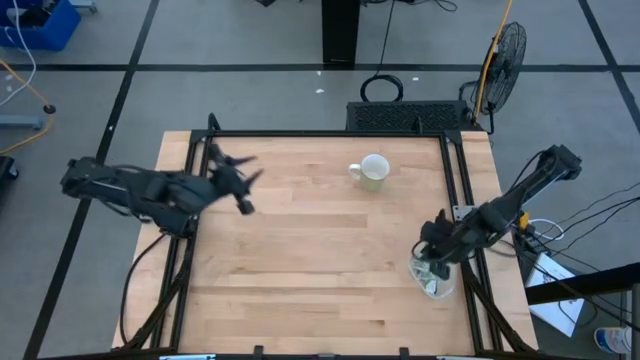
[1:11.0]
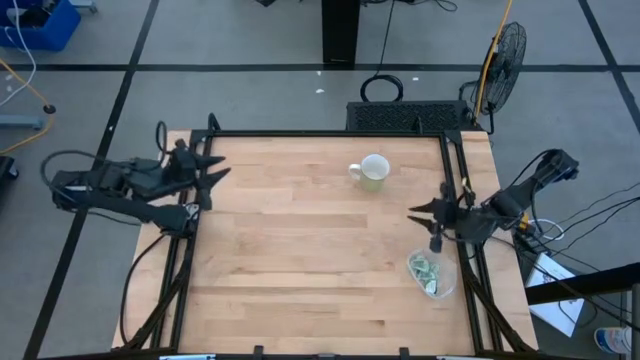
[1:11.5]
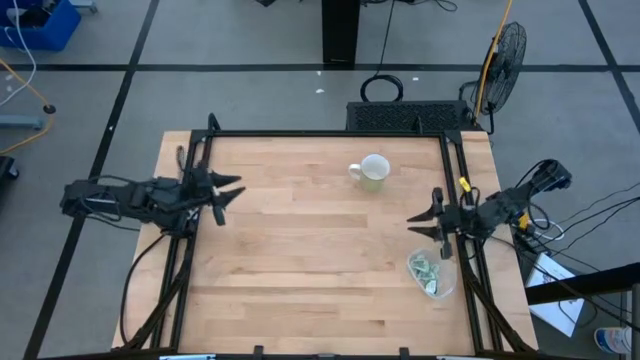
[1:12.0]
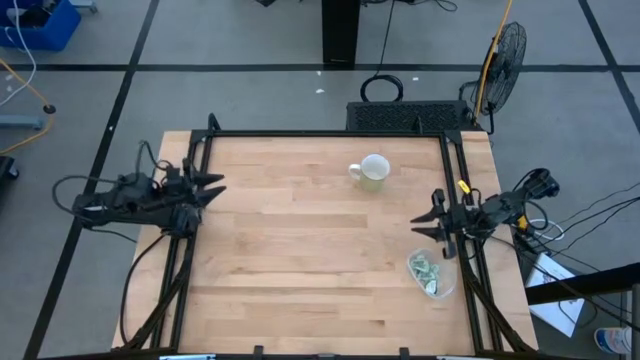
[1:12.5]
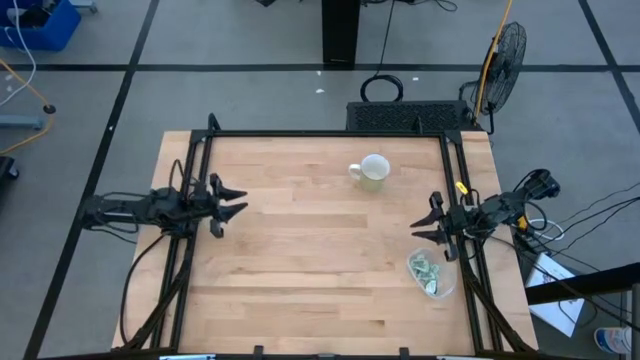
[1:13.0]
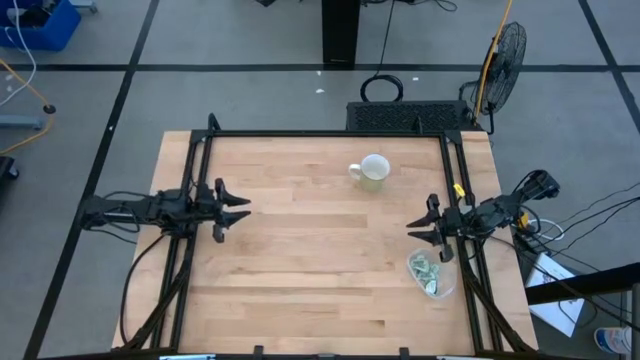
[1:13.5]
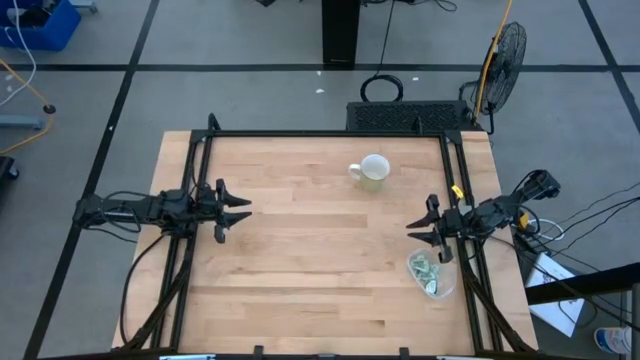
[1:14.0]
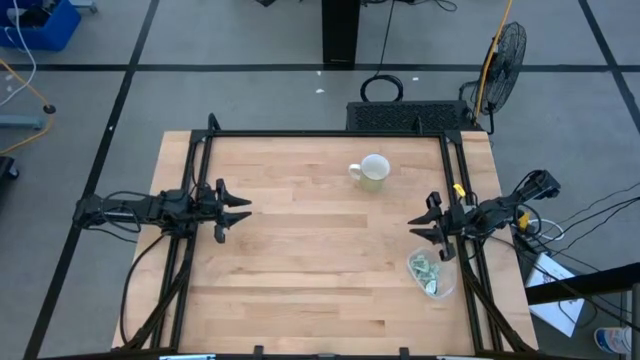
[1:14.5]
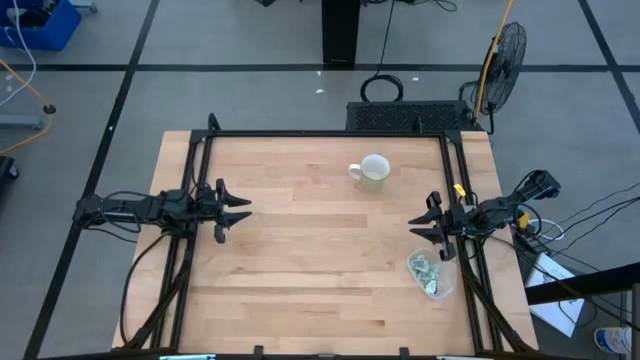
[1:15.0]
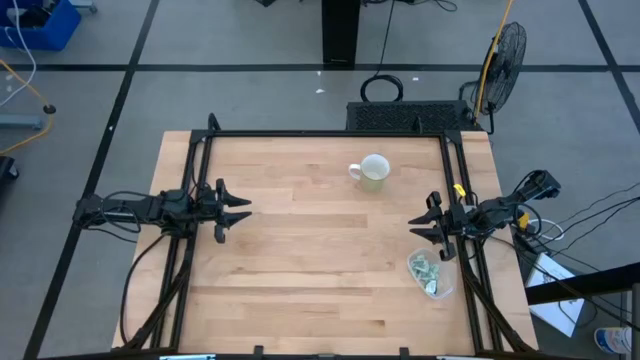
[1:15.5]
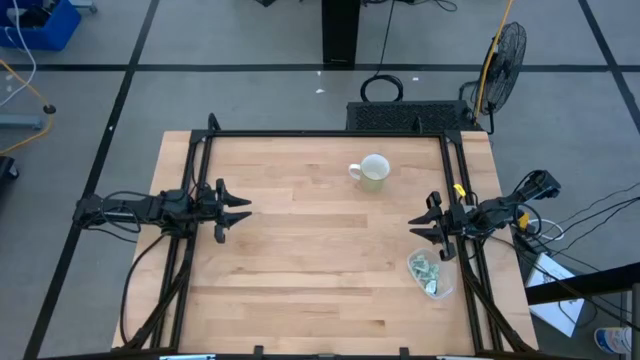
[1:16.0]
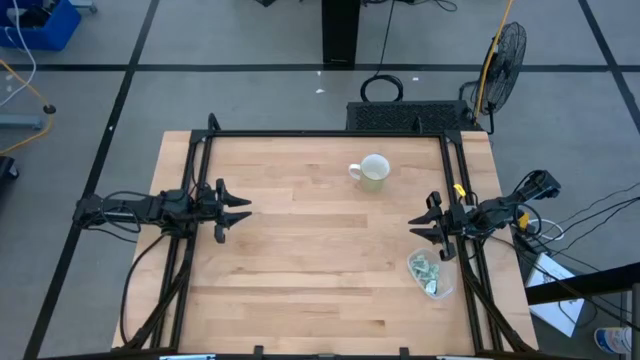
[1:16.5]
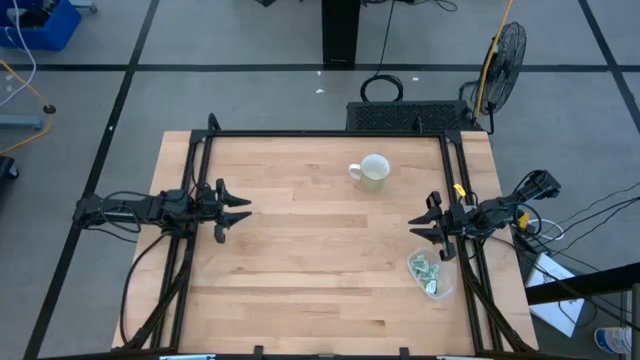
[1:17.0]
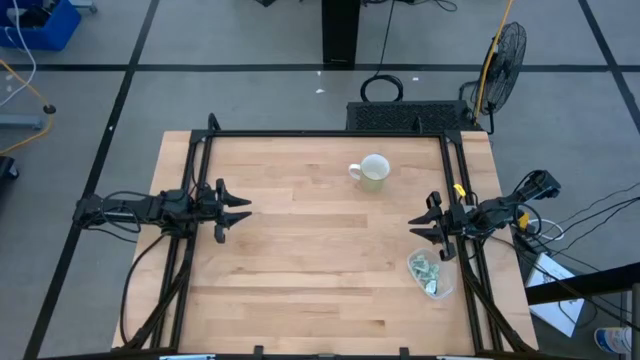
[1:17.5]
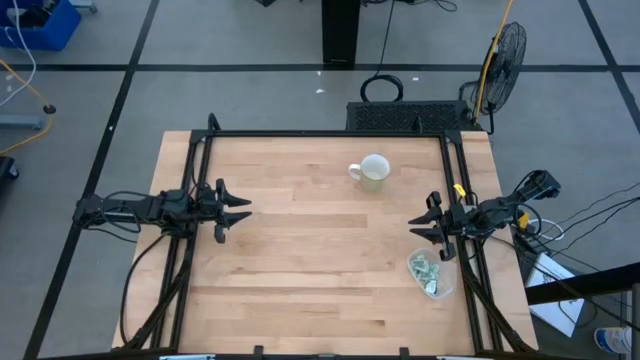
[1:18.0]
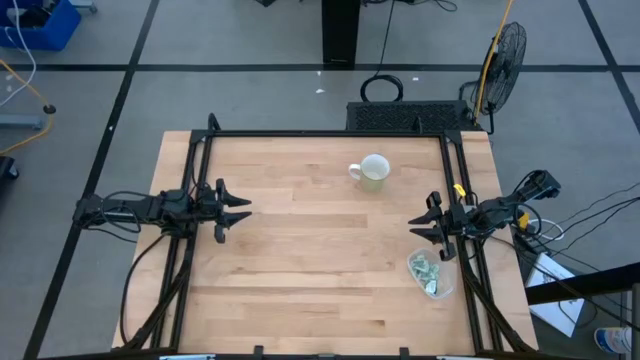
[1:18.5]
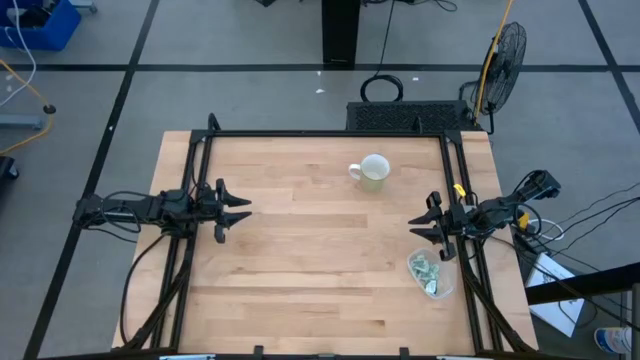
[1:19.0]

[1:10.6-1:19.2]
Task: Pick and place Stevia / Truvia into bins
Return to Home Position

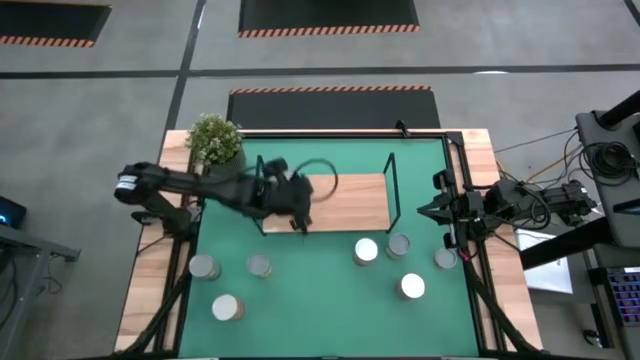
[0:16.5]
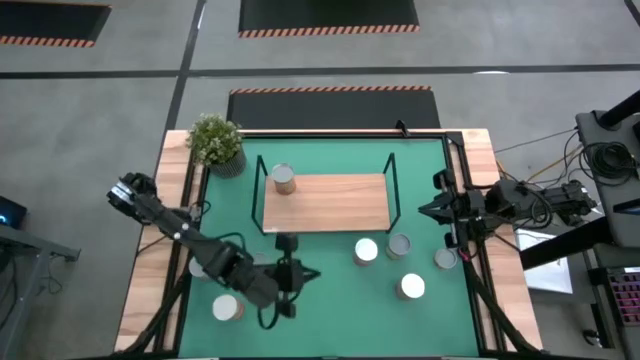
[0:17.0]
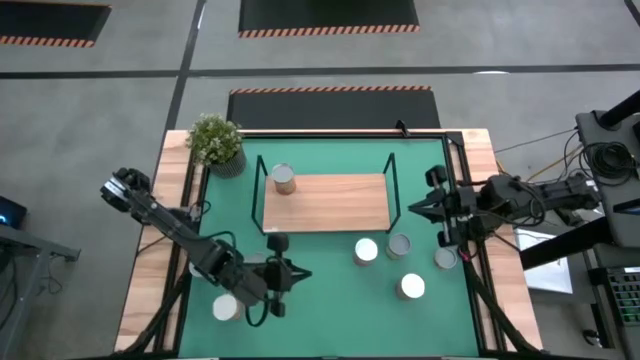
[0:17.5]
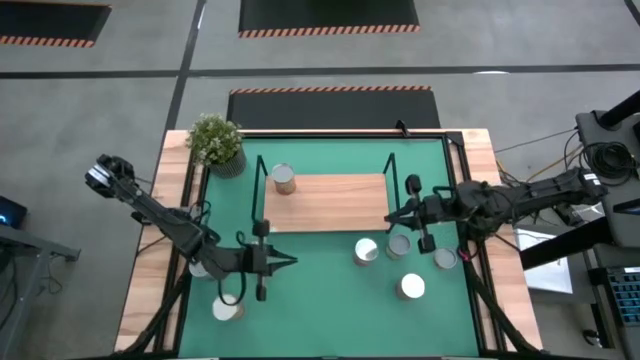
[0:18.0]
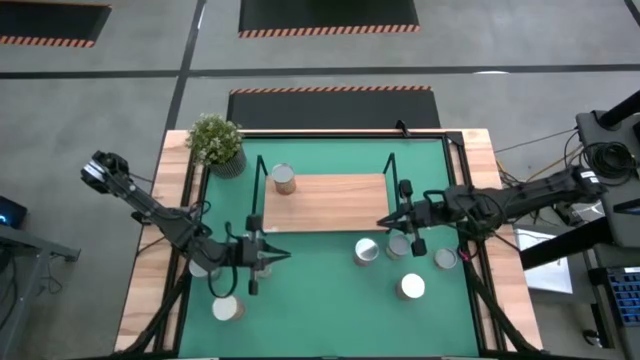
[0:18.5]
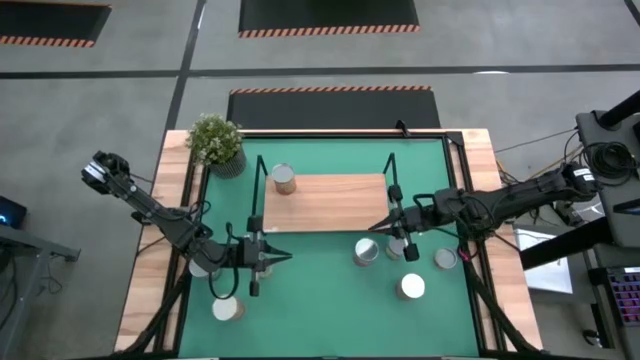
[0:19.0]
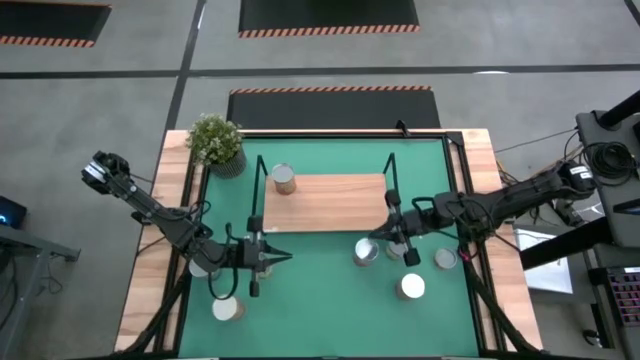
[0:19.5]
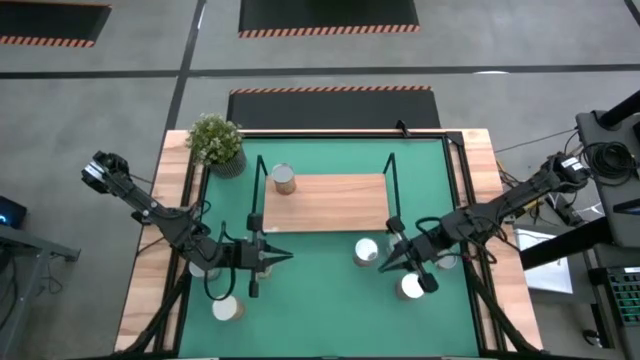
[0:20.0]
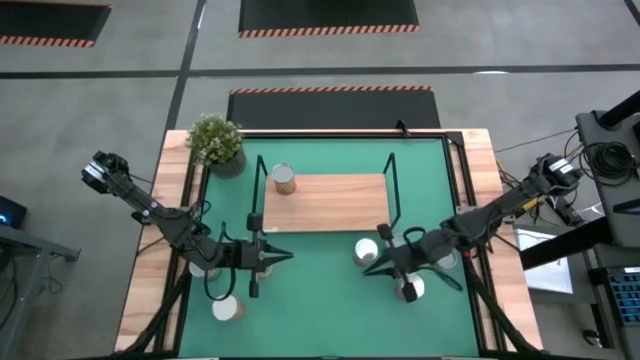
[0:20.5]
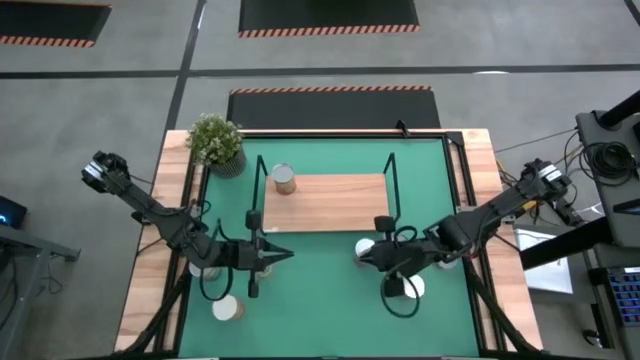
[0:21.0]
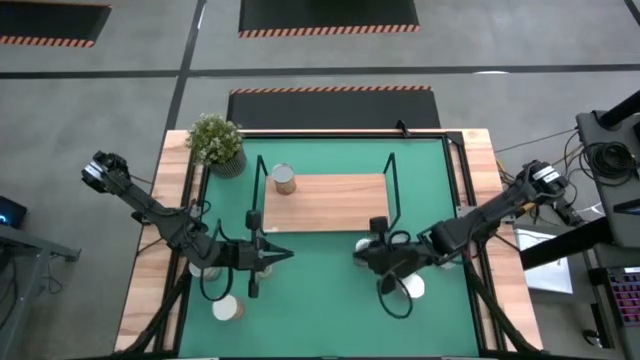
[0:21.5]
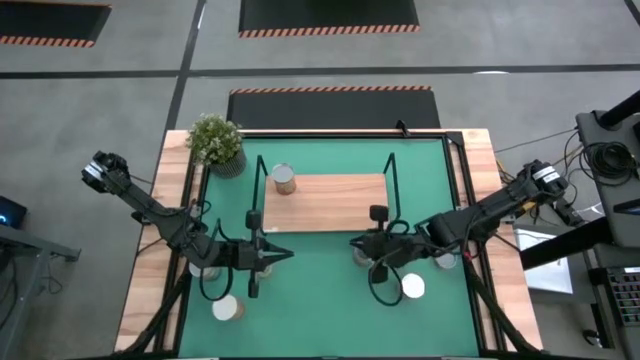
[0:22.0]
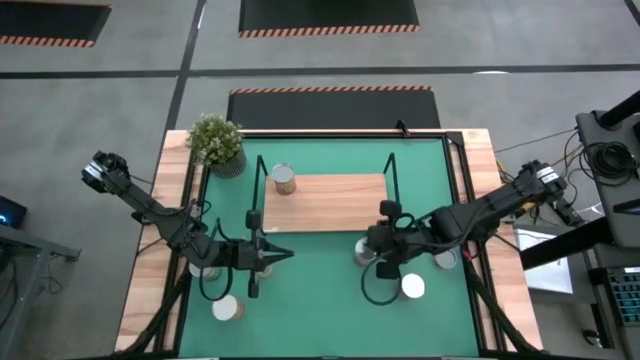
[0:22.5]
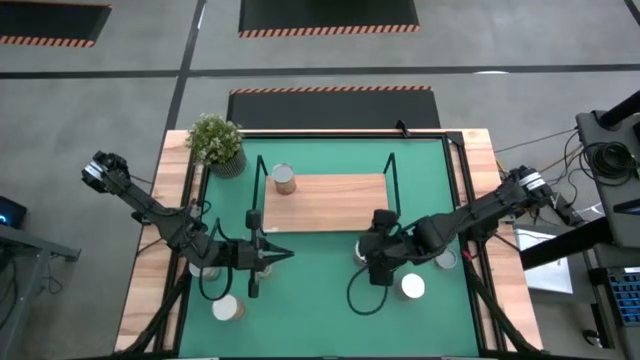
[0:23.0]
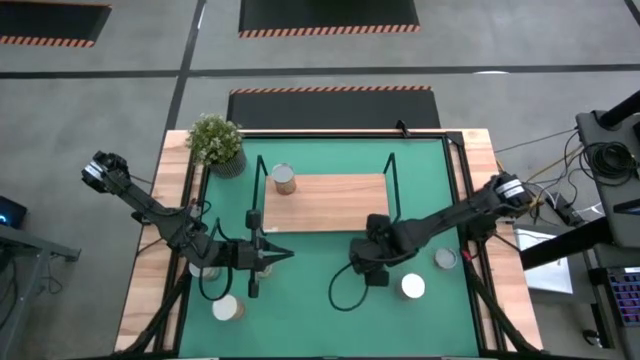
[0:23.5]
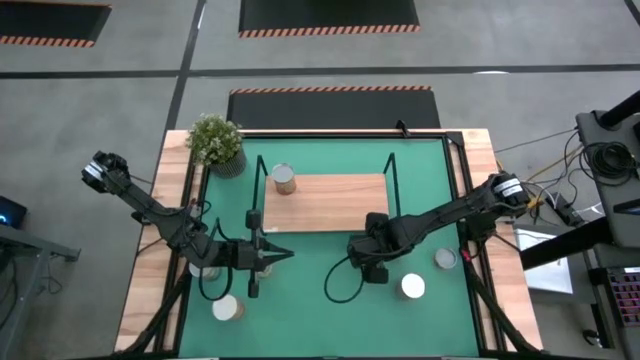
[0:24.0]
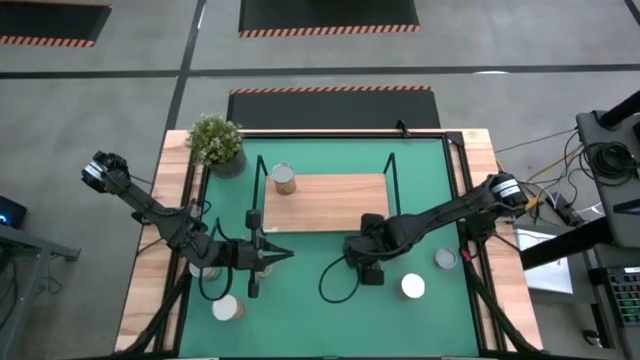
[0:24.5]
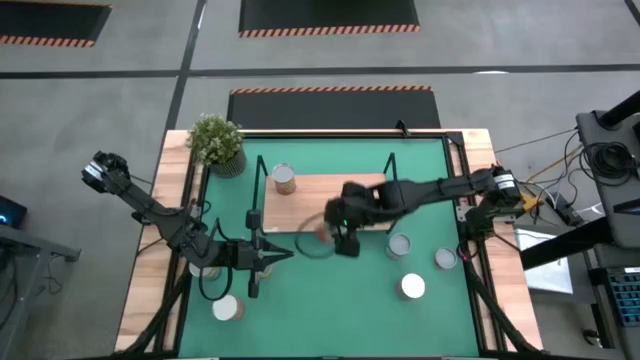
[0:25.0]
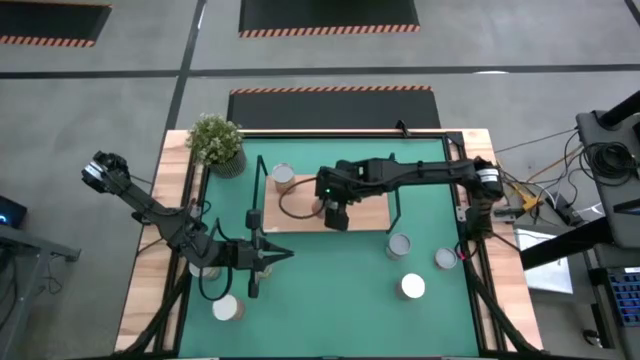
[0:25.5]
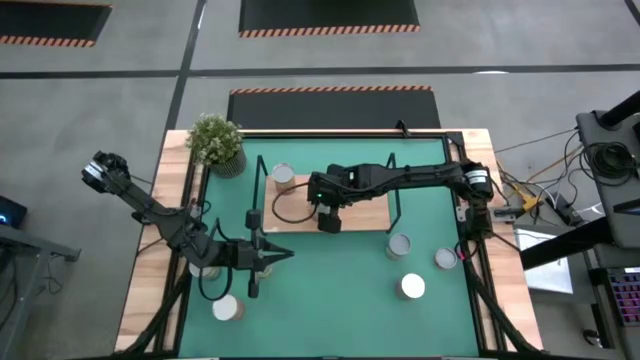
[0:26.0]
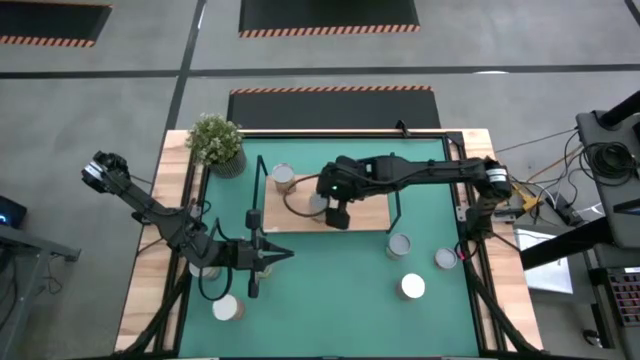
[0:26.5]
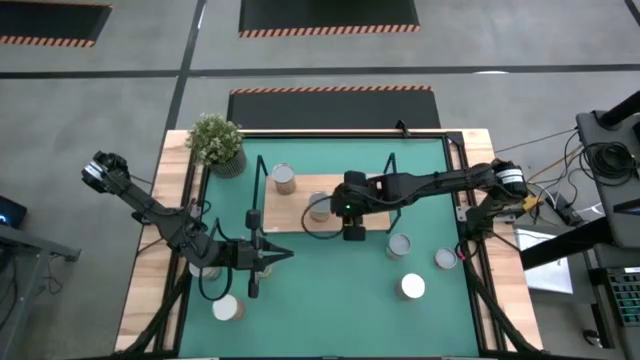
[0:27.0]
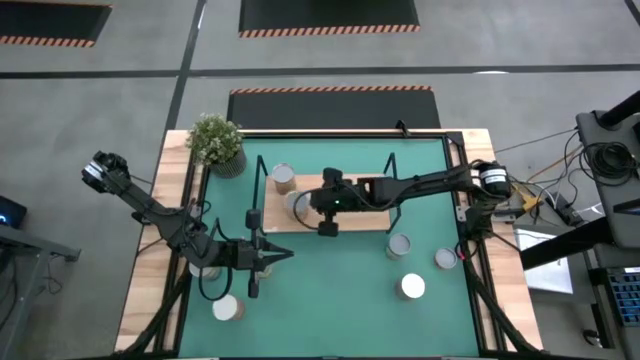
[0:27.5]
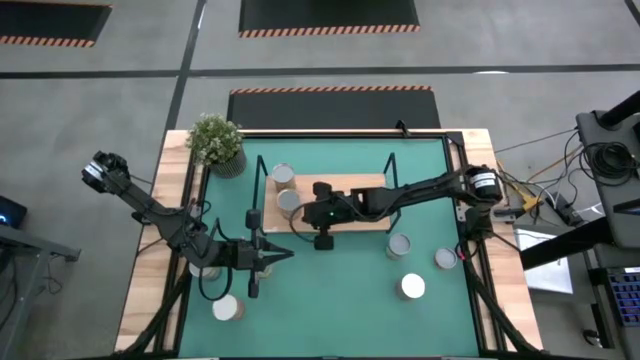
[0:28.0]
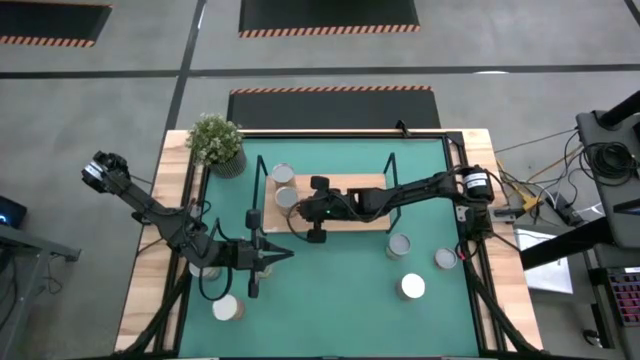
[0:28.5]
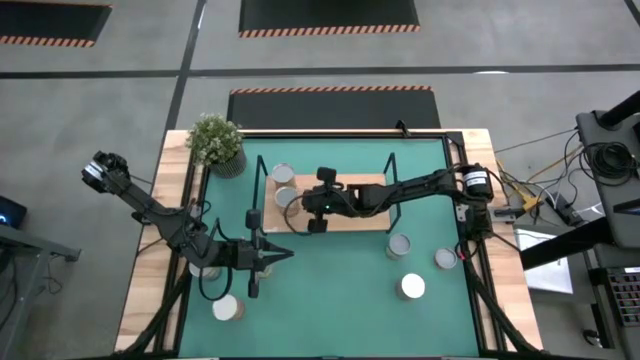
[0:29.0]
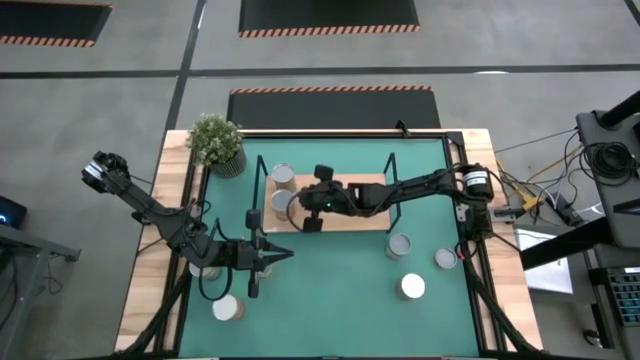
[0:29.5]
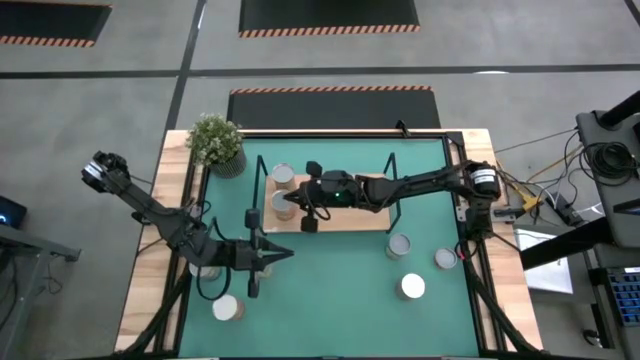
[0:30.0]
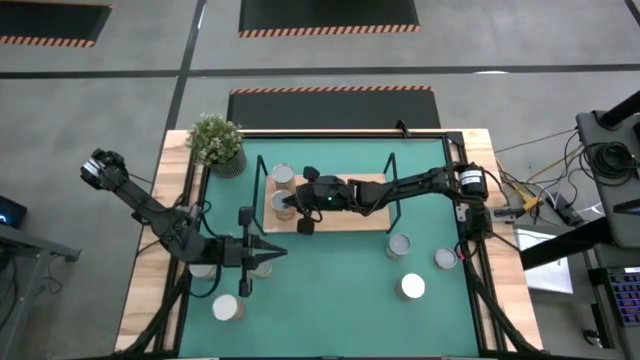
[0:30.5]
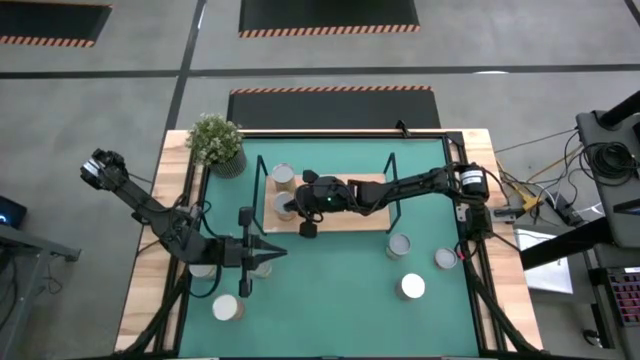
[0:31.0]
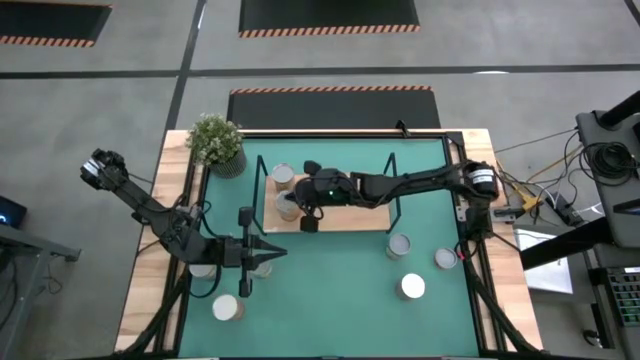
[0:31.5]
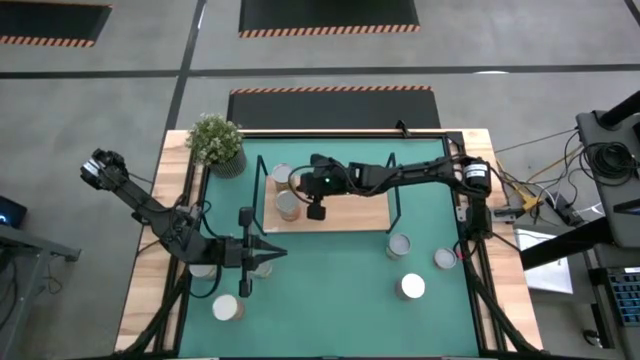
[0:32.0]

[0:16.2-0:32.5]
Task: Pick and place cans onto a shelf
Put the top canned corn on the shelf
